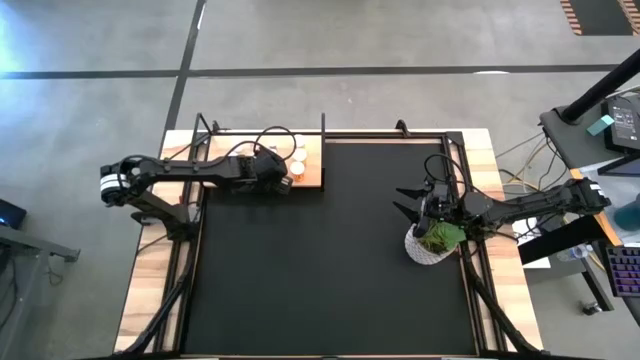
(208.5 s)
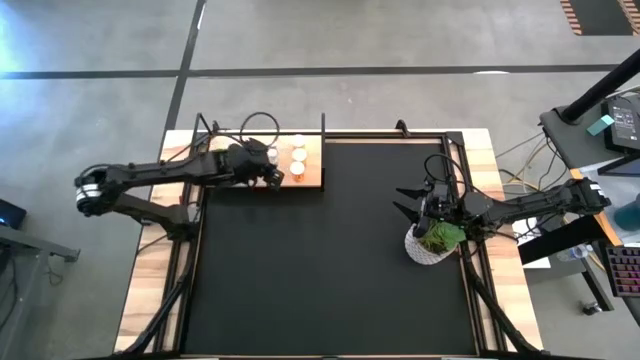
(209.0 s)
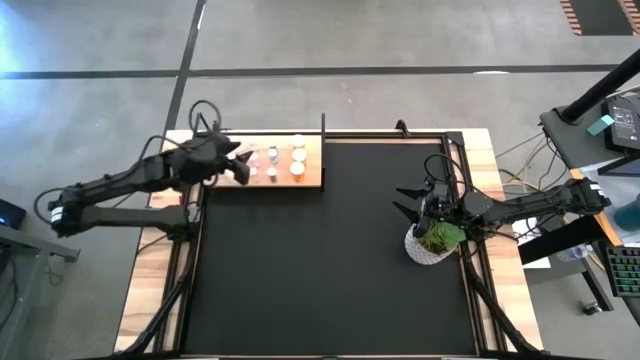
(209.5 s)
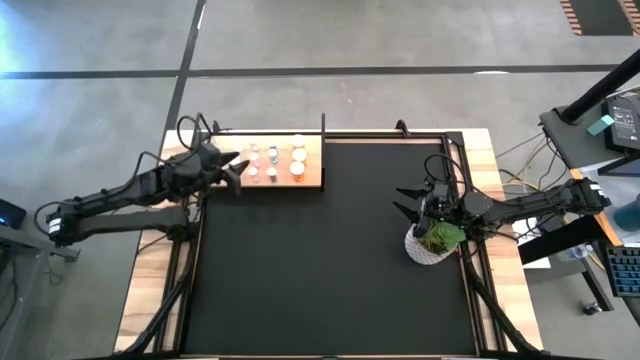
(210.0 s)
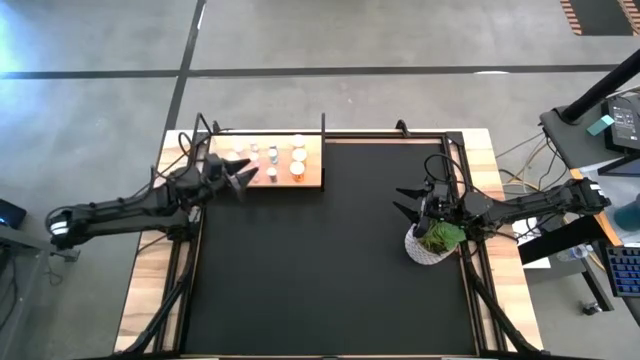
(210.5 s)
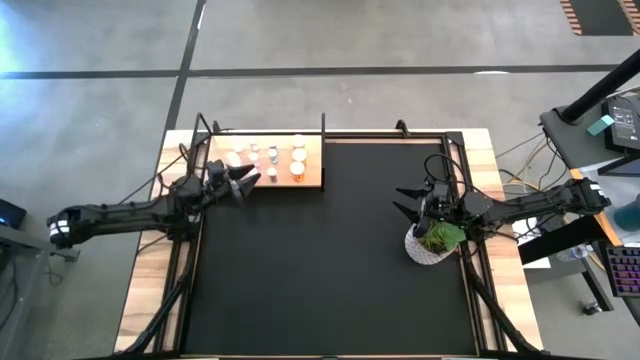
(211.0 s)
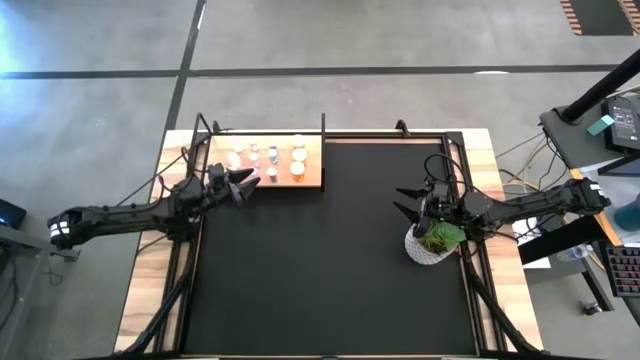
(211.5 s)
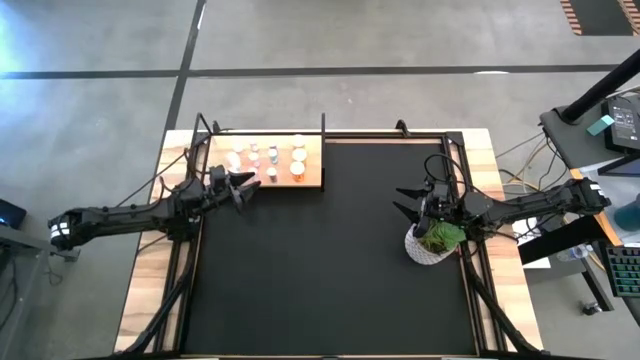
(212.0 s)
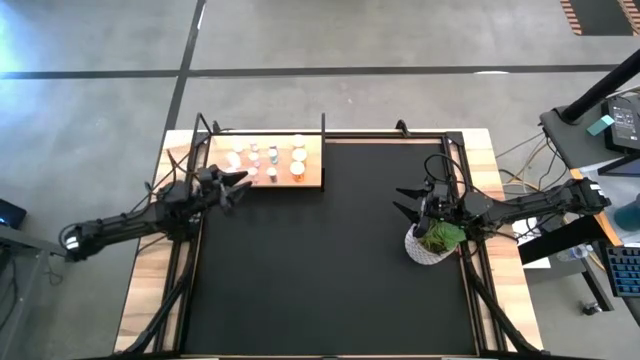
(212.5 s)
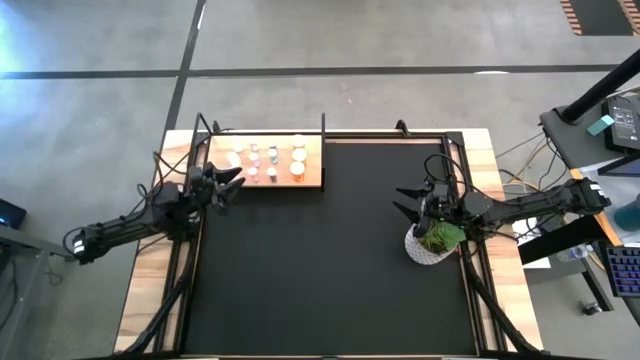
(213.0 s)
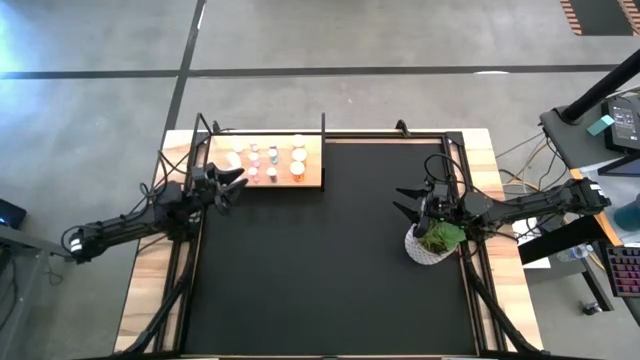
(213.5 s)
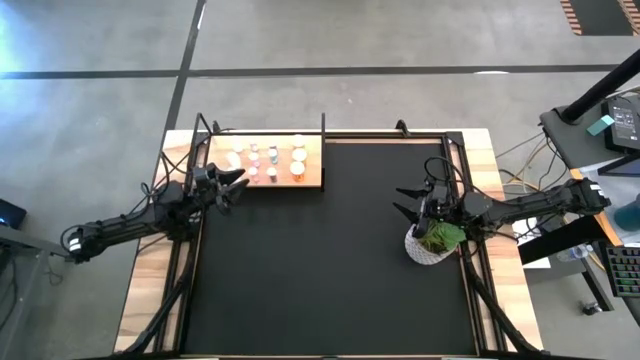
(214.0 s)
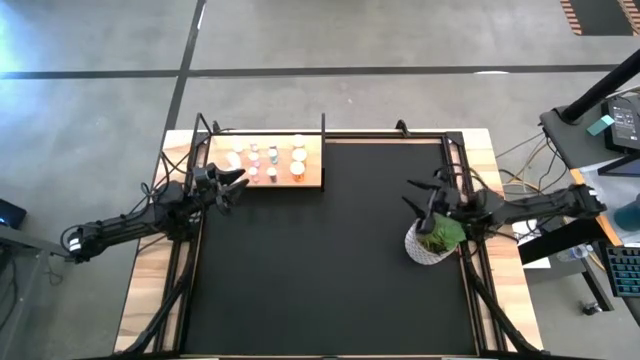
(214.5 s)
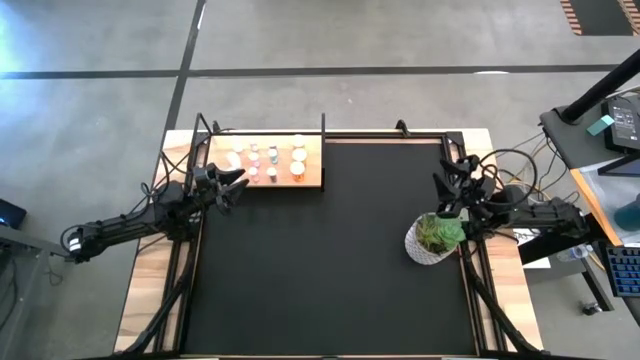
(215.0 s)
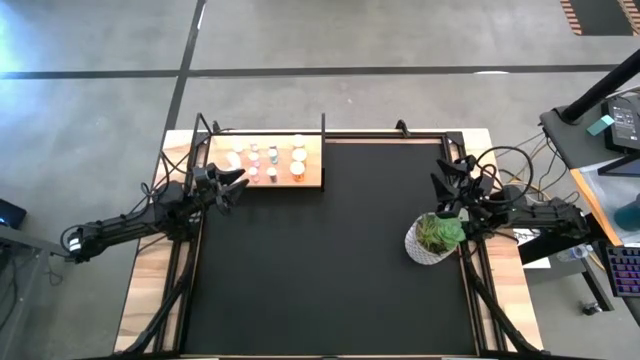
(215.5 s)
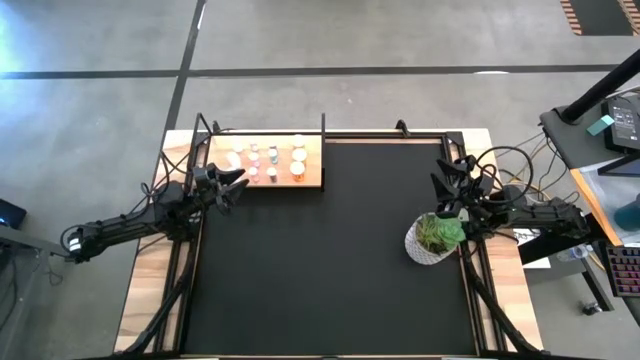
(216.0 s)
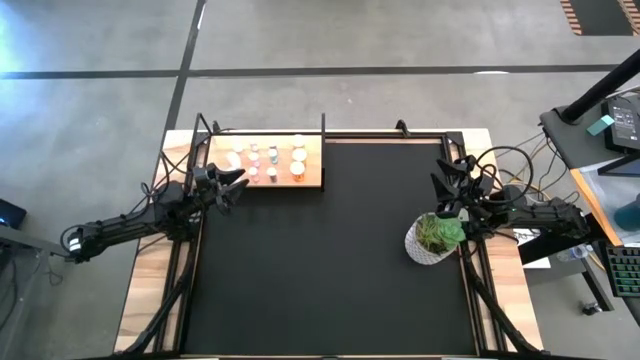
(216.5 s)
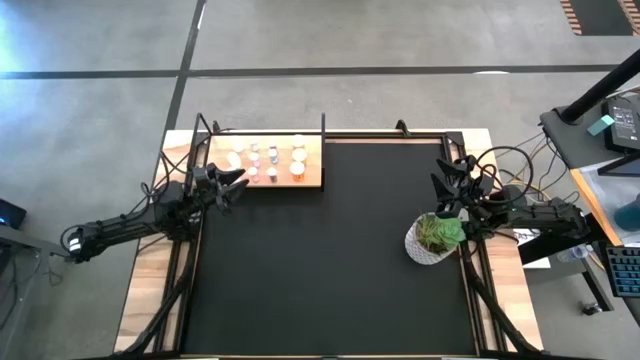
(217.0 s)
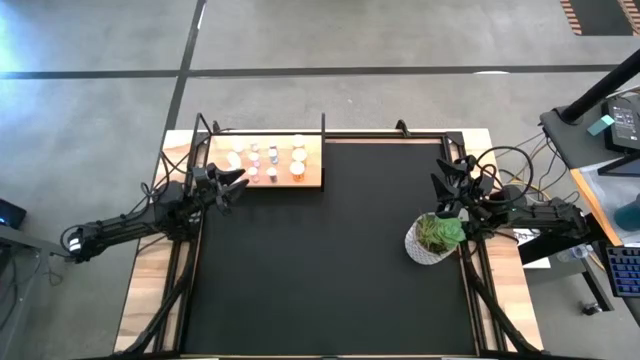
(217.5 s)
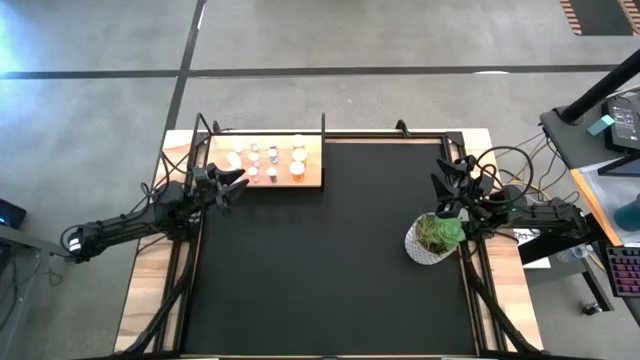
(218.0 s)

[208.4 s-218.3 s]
Task: Pick and place medicine bottles onto shelf by color
Return to Home Position

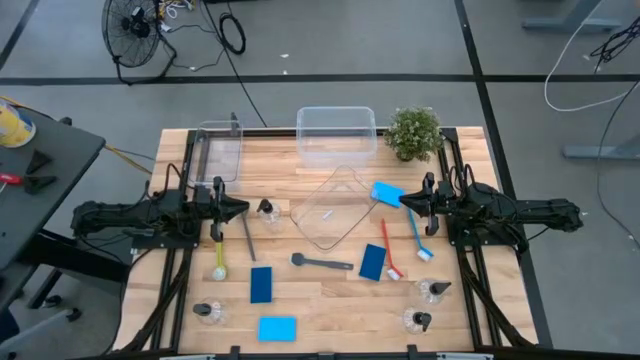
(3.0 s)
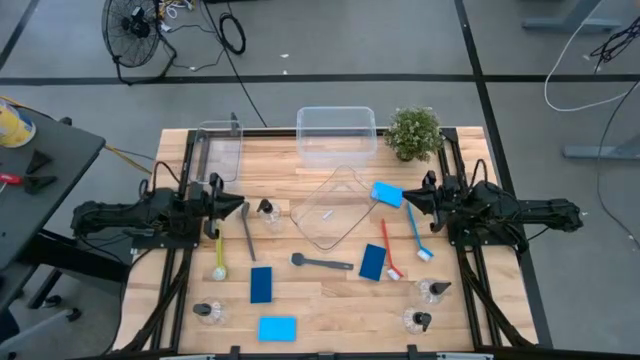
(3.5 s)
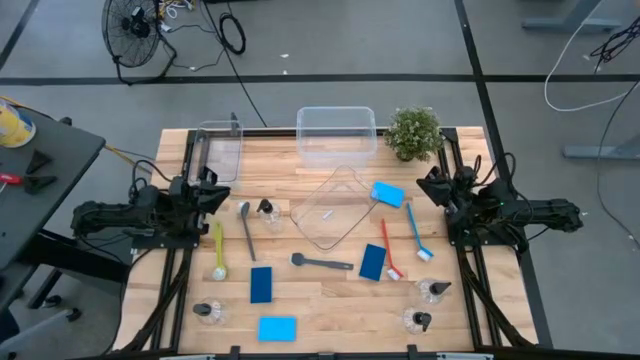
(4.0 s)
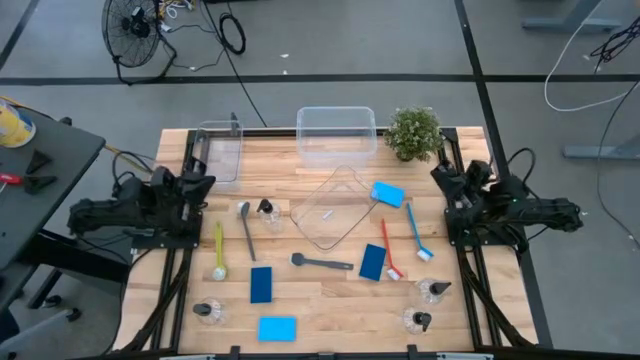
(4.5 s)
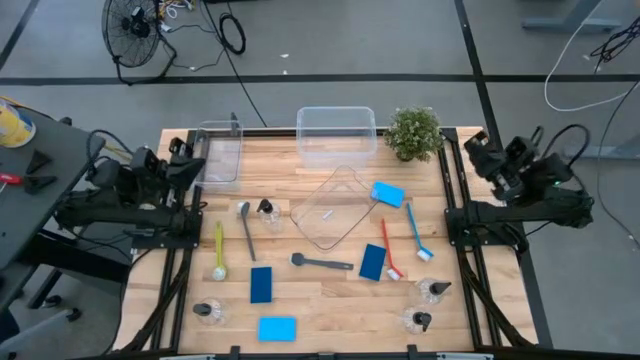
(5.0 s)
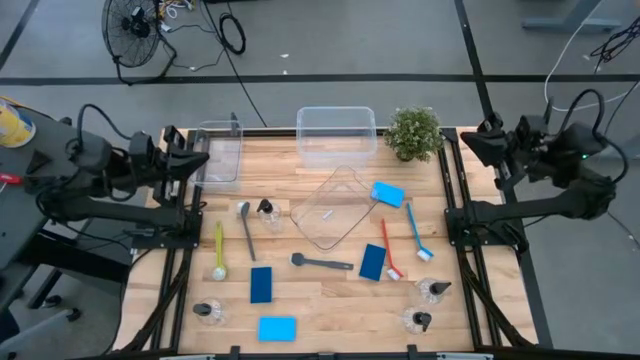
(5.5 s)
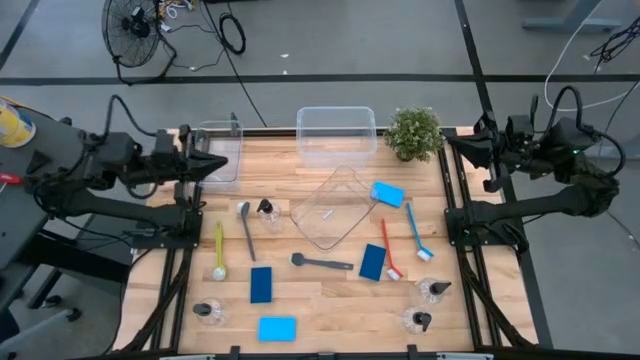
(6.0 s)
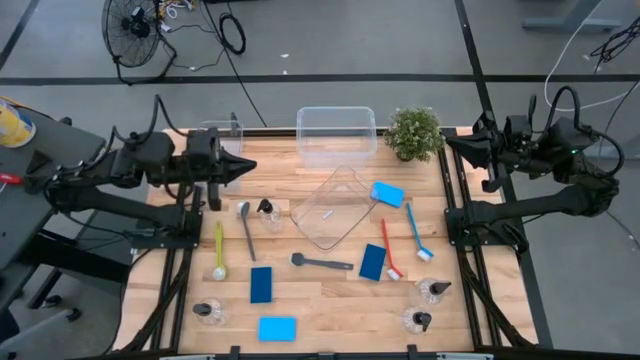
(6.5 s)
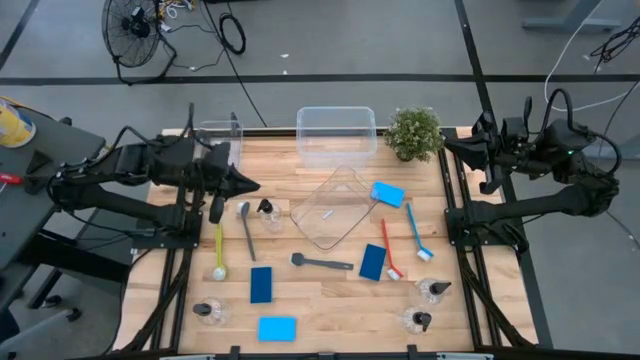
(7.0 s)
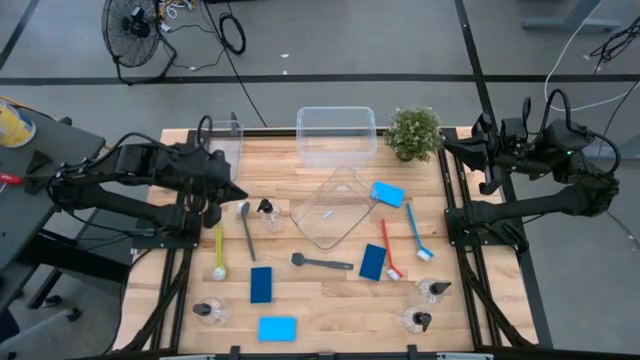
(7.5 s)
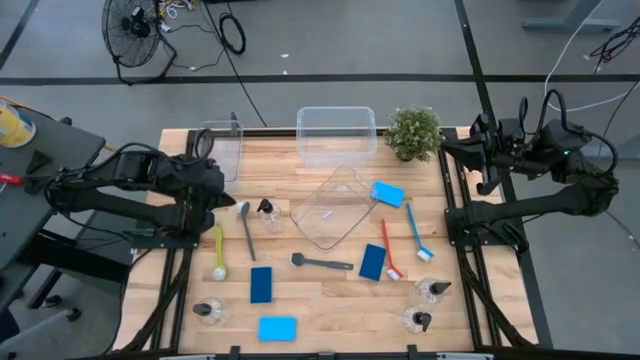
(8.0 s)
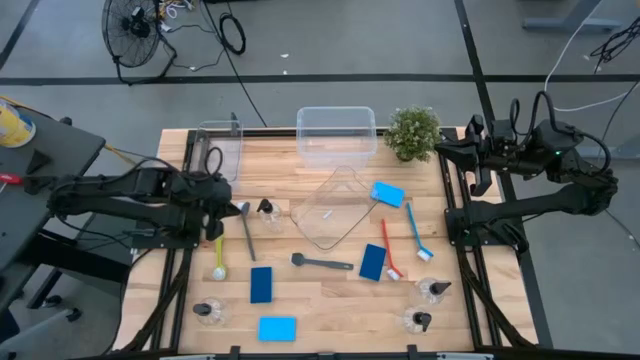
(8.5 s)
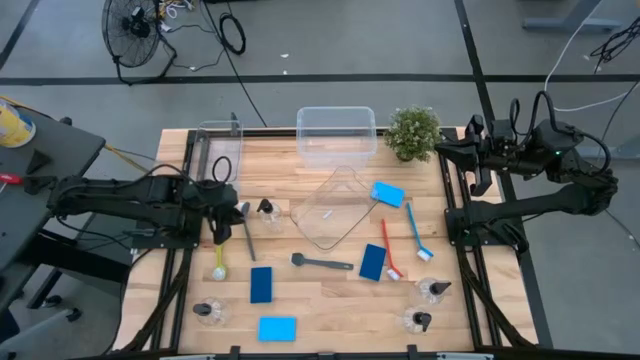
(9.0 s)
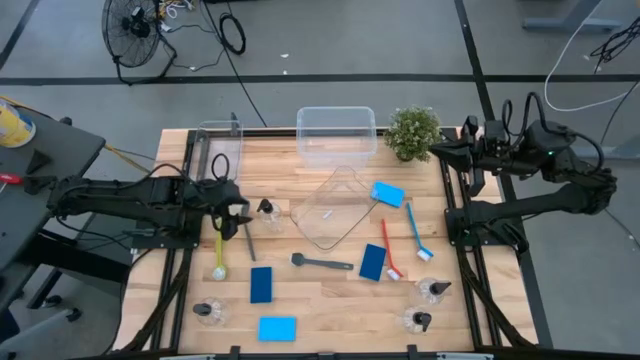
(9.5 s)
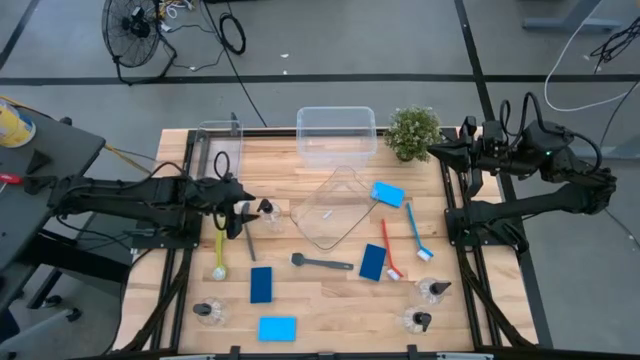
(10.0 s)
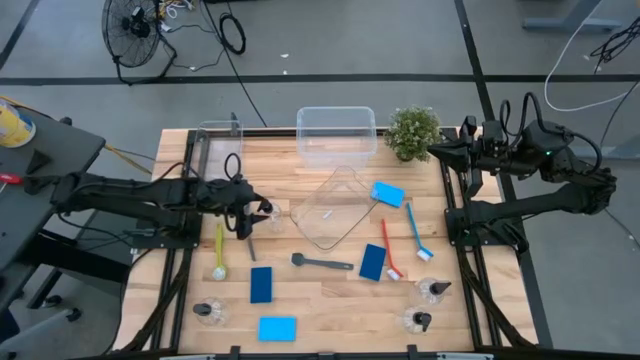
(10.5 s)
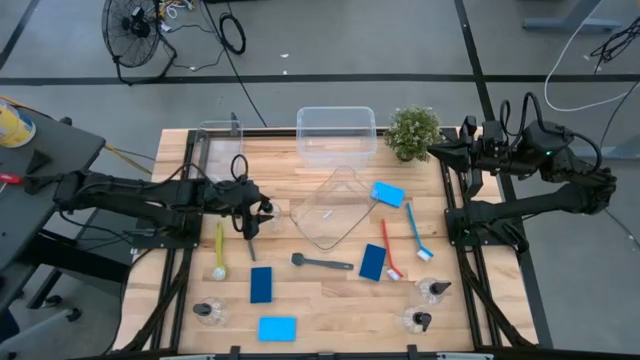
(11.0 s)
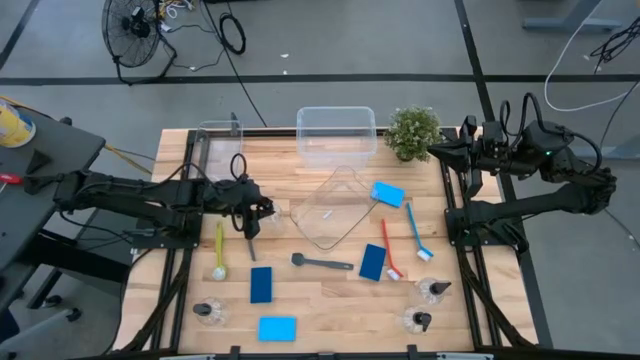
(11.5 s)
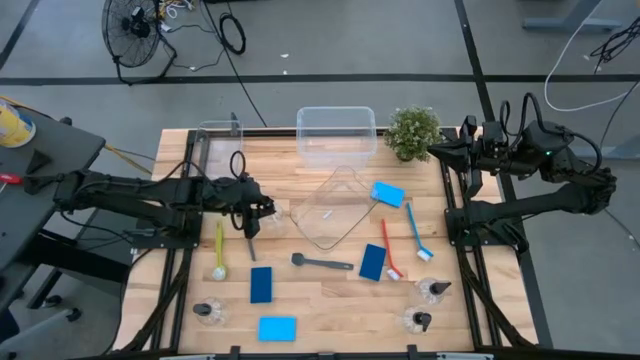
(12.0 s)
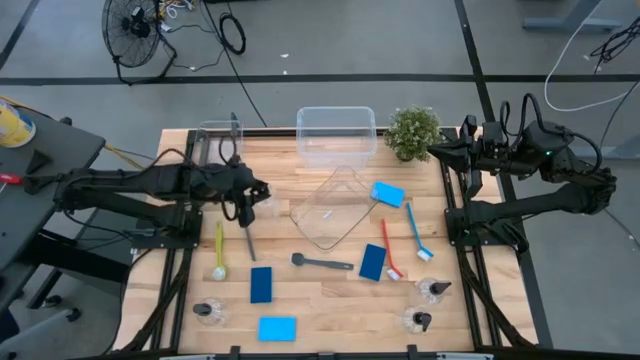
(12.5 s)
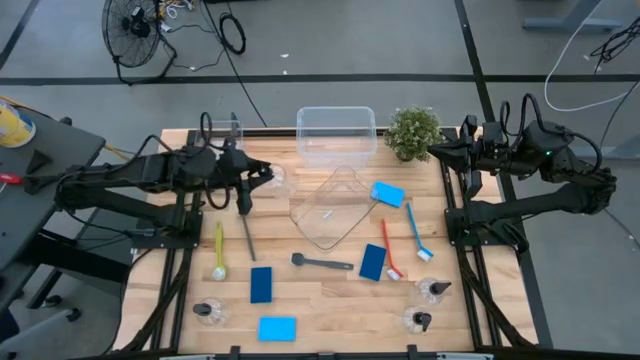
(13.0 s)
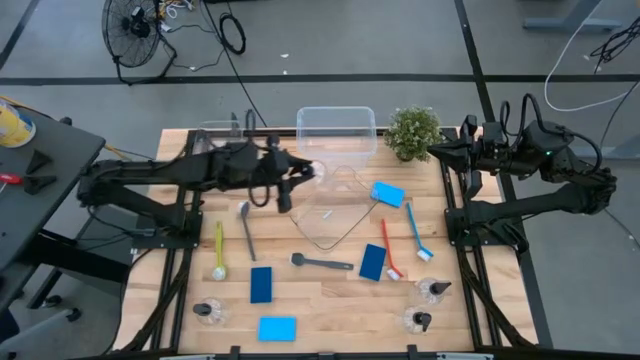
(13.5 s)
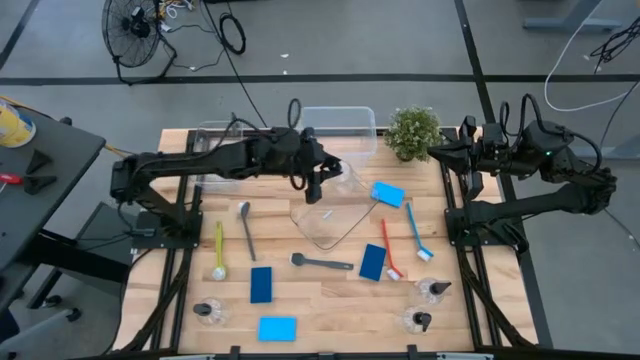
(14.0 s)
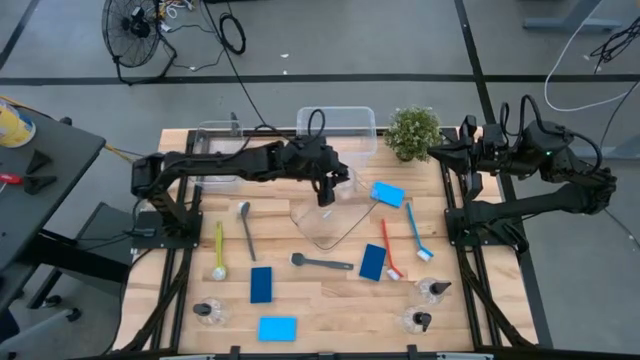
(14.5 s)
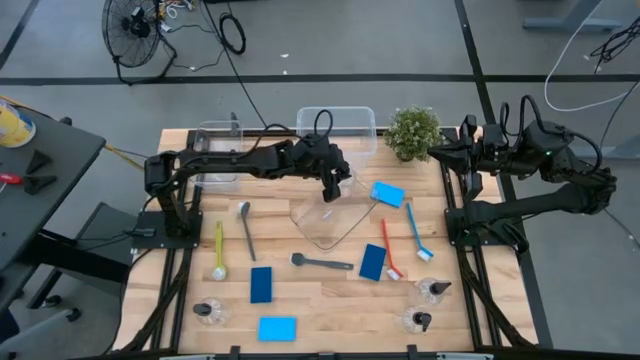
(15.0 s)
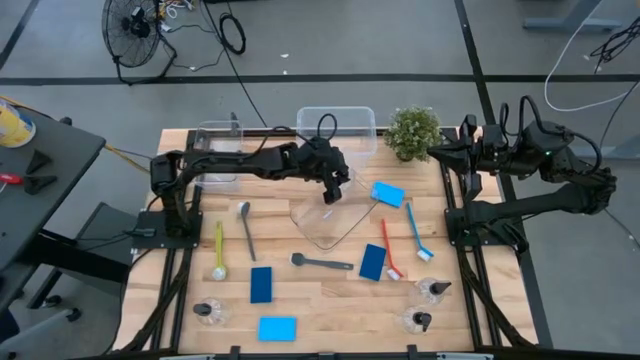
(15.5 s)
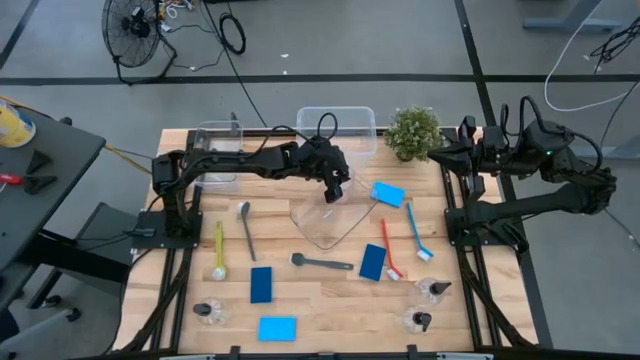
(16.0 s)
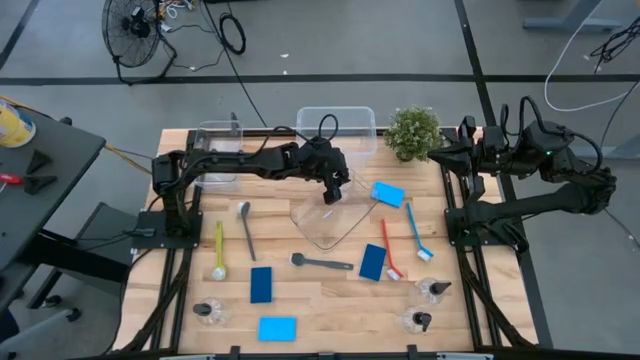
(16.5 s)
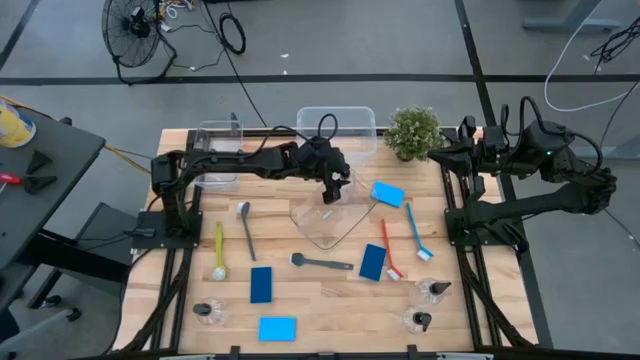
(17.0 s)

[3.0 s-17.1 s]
Task: Pick & Place Kitchen Sink Supplies
Put the dishwashing liquid dispenser into the right transparent bin
